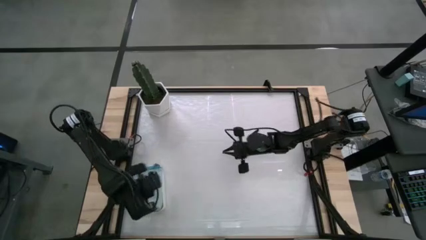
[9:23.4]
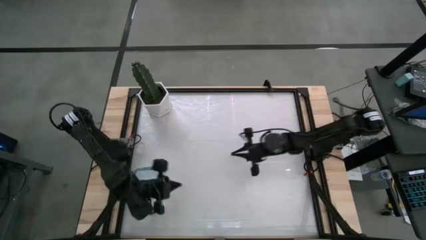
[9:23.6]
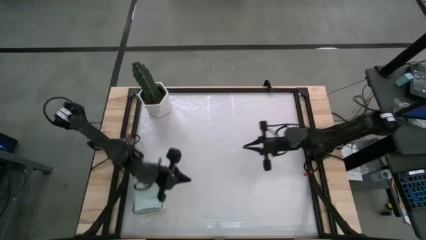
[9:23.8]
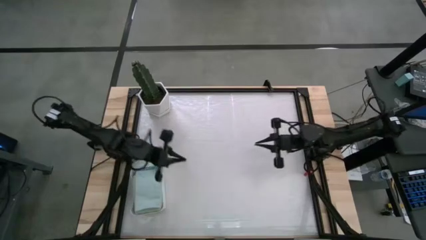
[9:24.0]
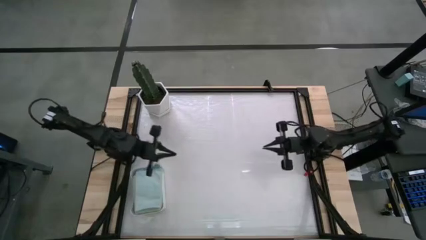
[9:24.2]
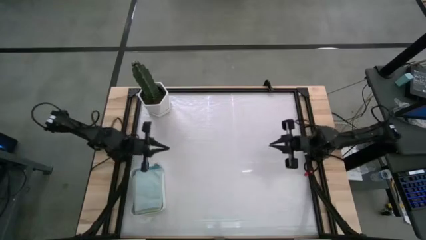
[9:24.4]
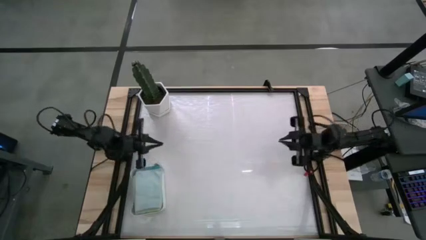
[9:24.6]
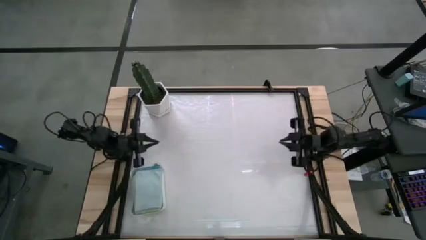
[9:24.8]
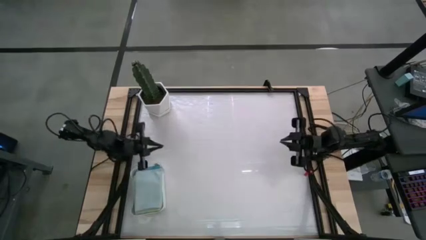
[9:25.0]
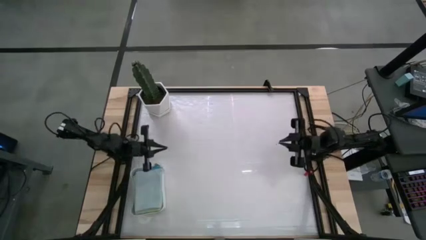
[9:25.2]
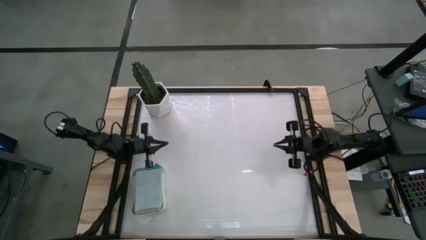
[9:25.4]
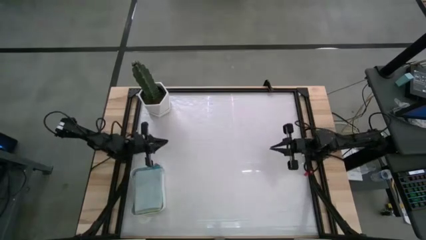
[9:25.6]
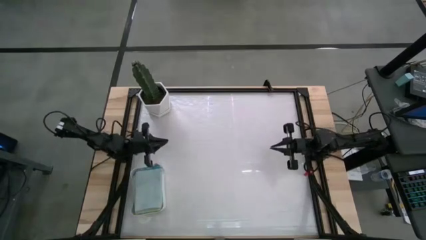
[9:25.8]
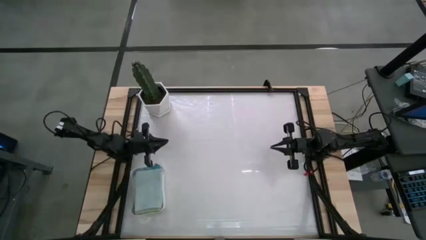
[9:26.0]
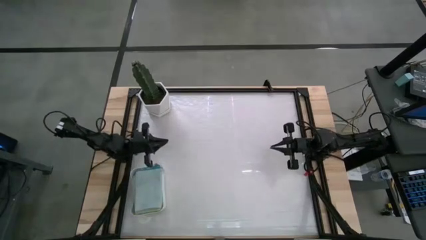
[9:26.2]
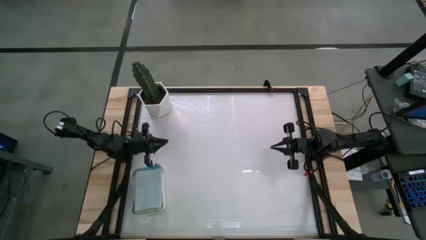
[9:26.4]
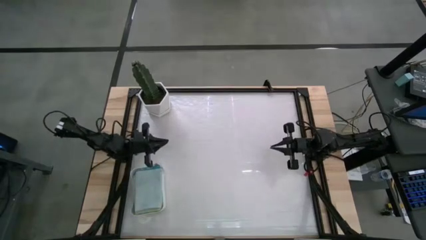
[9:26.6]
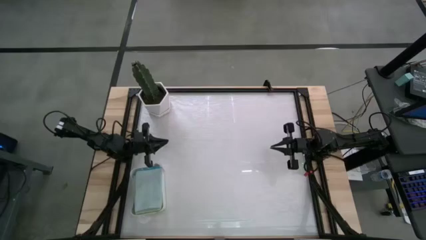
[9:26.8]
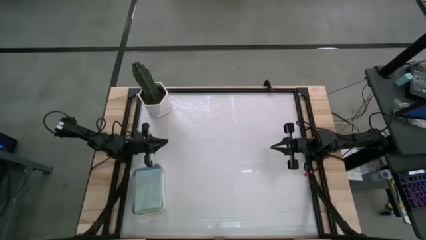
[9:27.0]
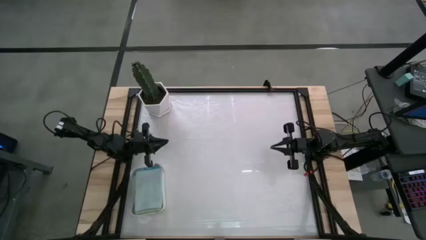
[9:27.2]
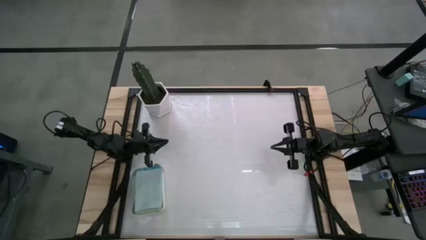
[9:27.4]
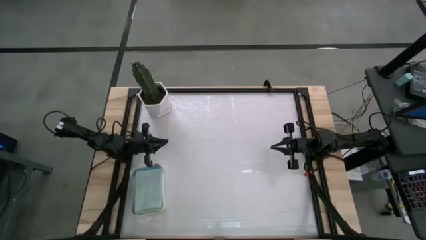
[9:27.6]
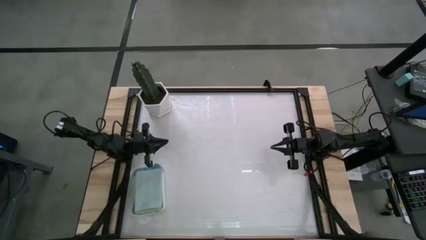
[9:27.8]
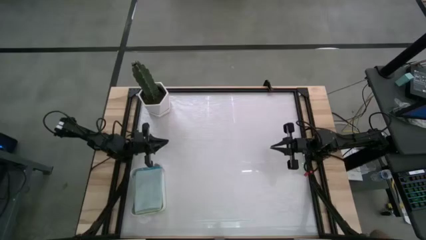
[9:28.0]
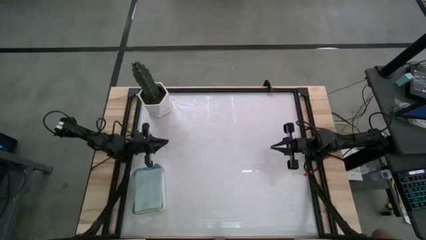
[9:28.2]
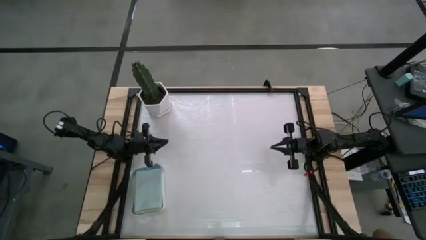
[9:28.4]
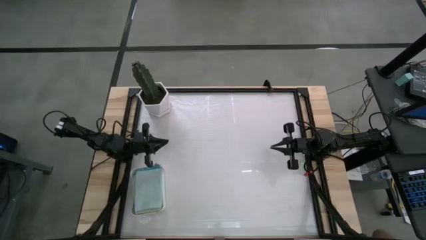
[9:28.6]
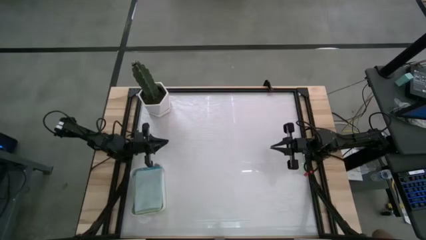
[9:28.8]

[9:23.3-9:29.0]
Task: Fold microfiber towels
Return to Home Position

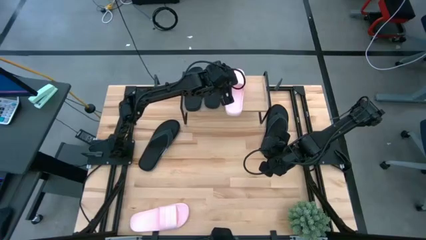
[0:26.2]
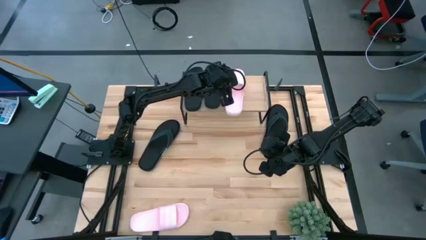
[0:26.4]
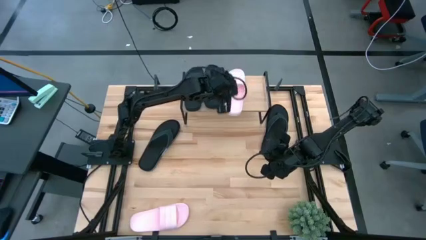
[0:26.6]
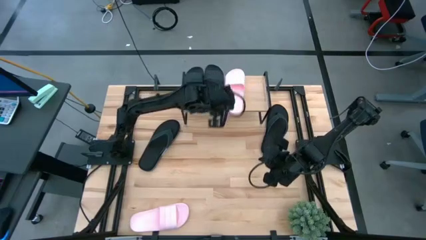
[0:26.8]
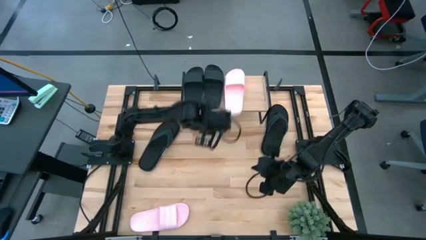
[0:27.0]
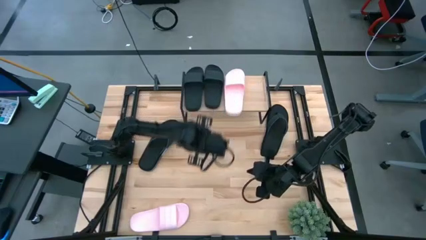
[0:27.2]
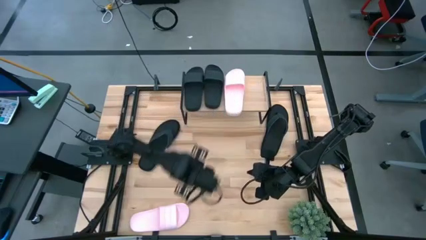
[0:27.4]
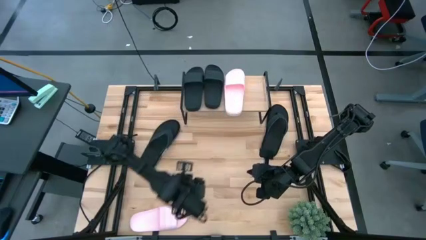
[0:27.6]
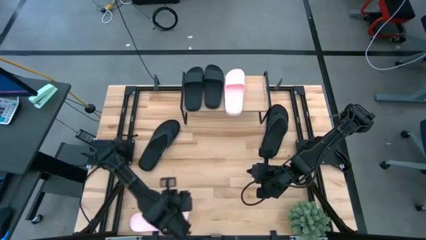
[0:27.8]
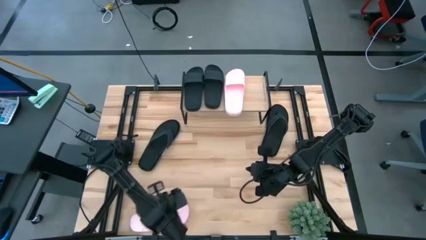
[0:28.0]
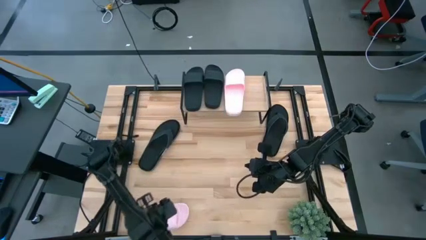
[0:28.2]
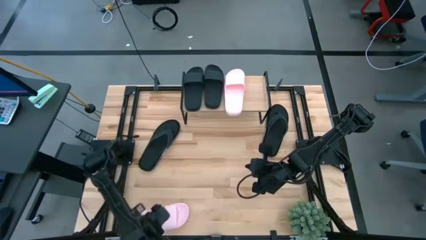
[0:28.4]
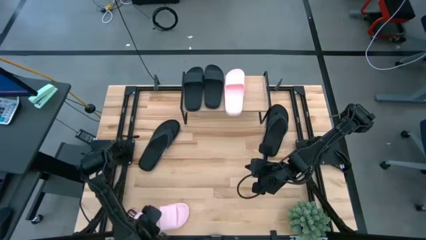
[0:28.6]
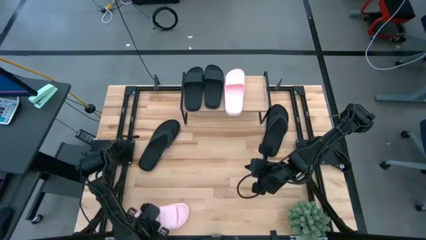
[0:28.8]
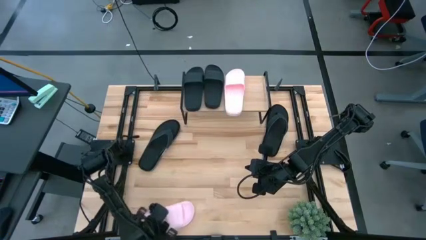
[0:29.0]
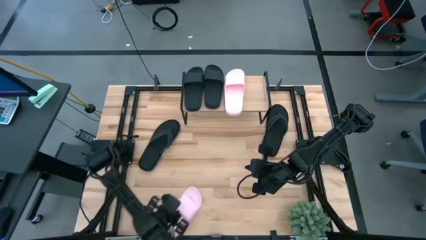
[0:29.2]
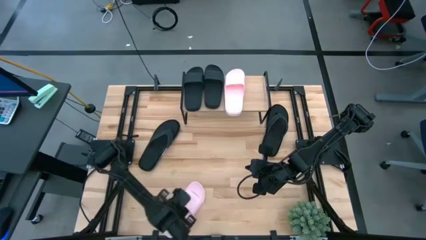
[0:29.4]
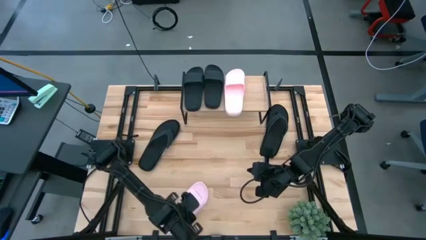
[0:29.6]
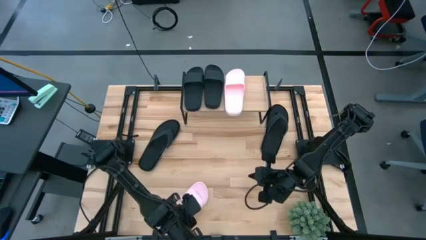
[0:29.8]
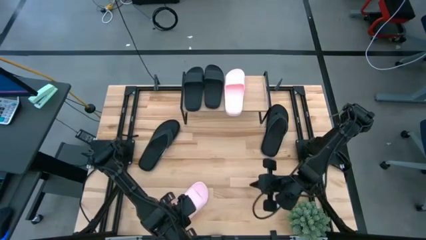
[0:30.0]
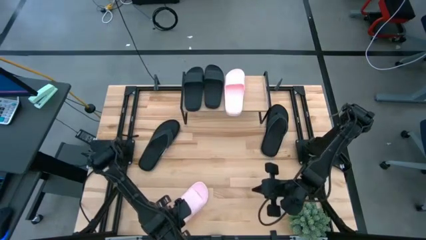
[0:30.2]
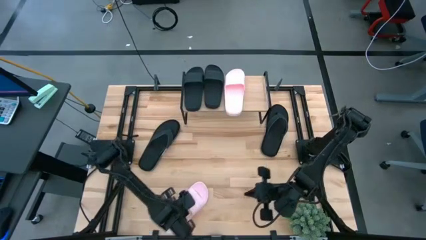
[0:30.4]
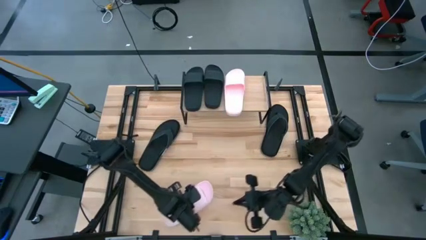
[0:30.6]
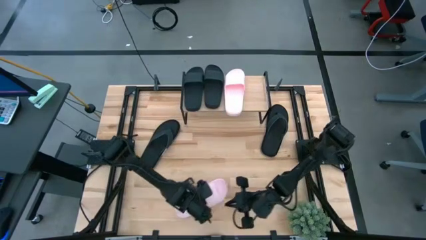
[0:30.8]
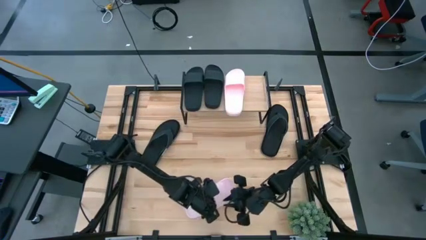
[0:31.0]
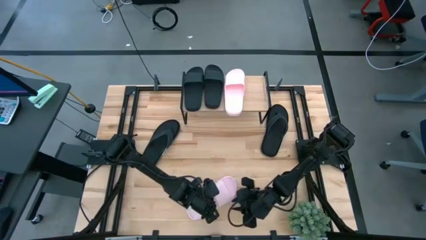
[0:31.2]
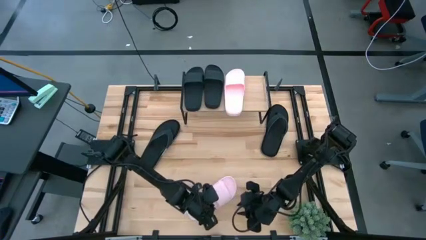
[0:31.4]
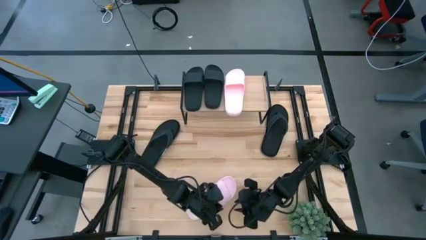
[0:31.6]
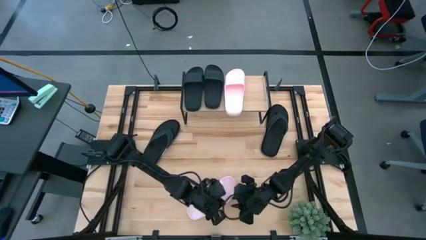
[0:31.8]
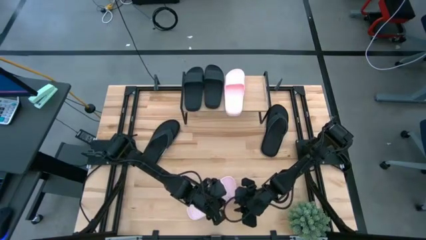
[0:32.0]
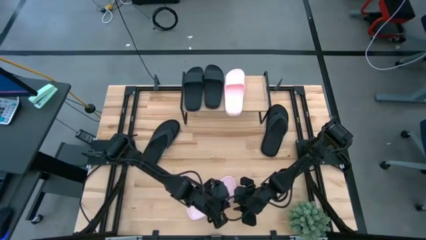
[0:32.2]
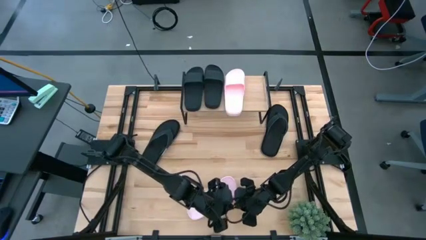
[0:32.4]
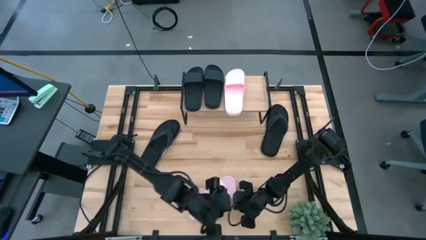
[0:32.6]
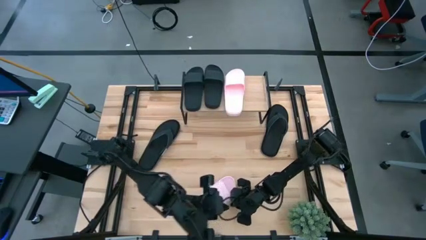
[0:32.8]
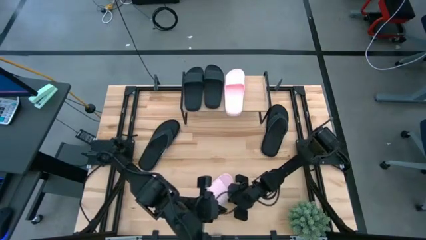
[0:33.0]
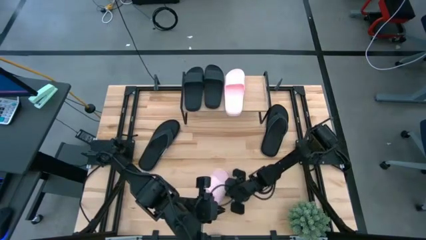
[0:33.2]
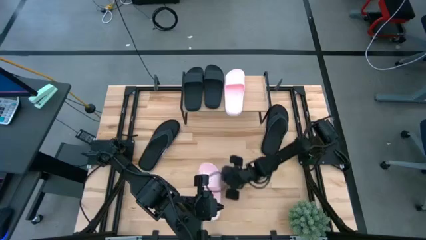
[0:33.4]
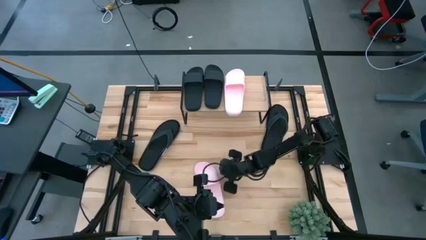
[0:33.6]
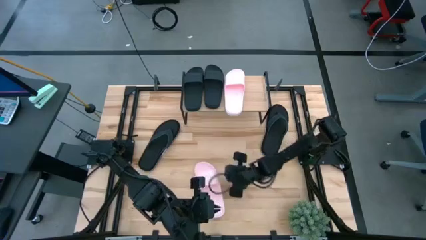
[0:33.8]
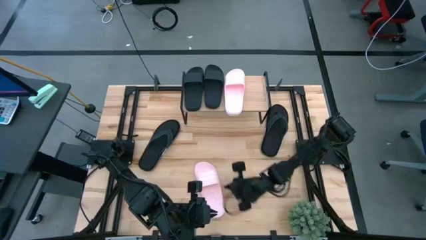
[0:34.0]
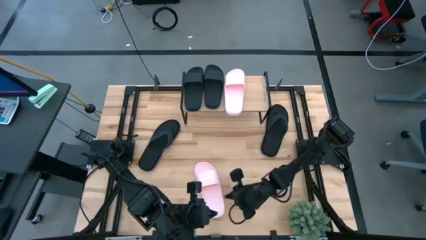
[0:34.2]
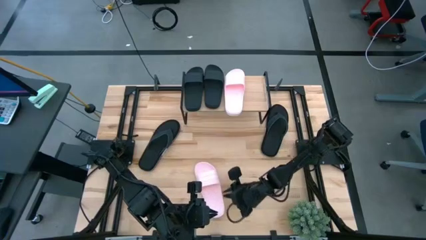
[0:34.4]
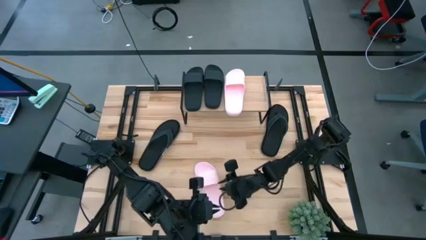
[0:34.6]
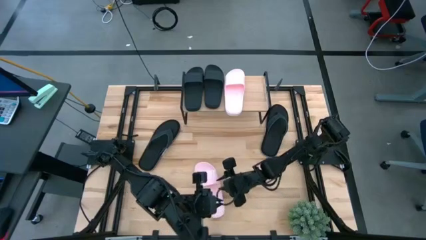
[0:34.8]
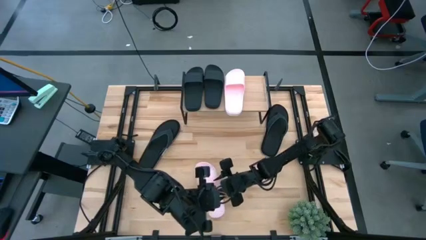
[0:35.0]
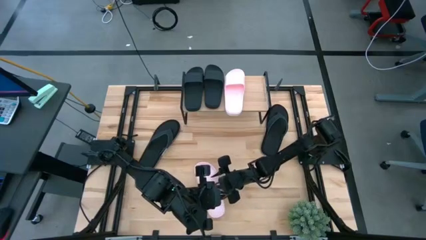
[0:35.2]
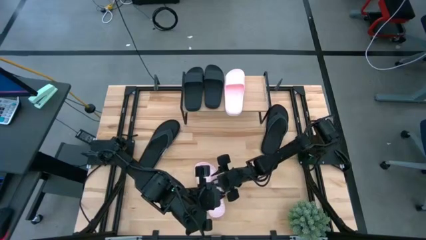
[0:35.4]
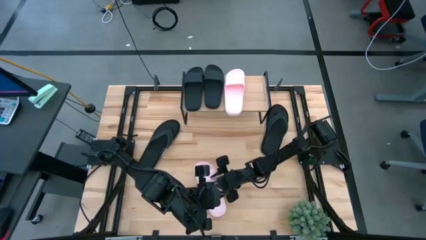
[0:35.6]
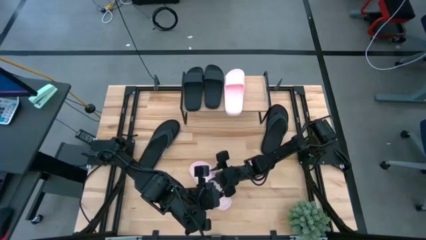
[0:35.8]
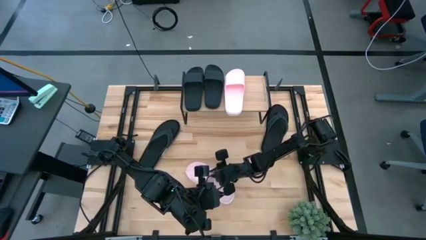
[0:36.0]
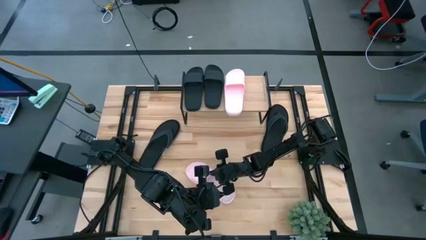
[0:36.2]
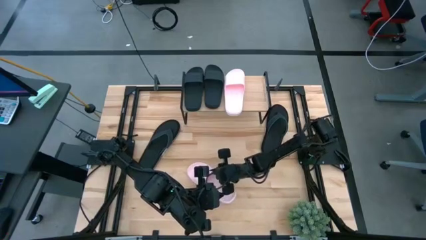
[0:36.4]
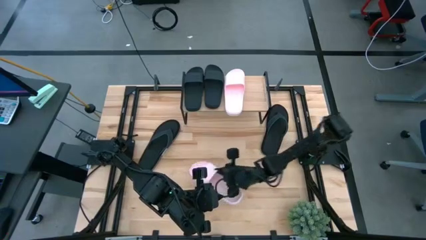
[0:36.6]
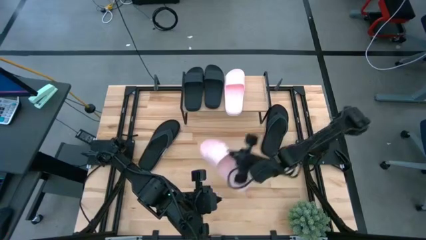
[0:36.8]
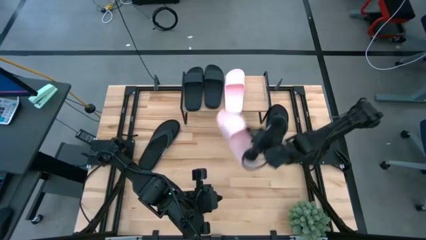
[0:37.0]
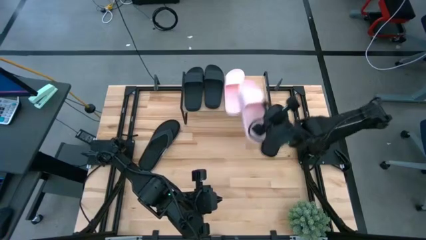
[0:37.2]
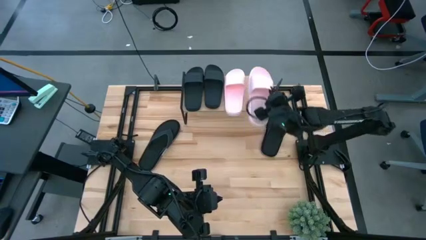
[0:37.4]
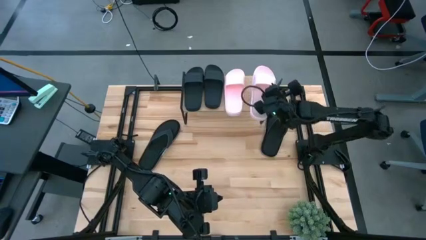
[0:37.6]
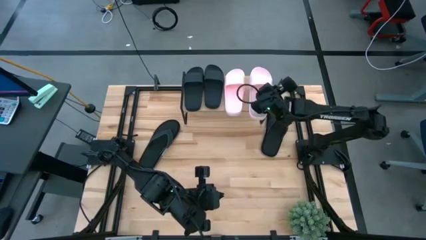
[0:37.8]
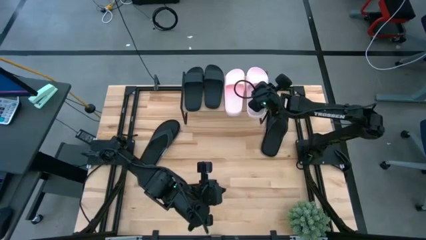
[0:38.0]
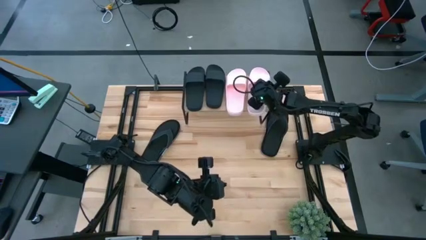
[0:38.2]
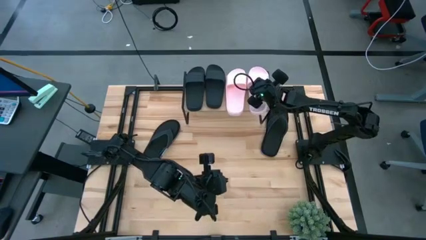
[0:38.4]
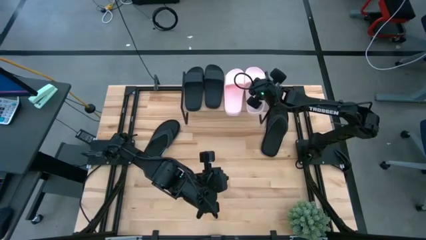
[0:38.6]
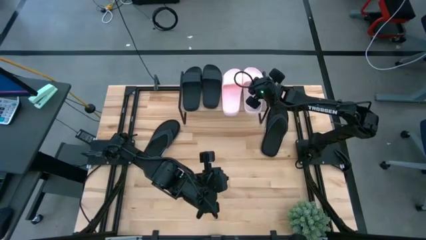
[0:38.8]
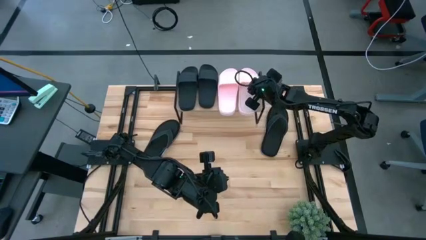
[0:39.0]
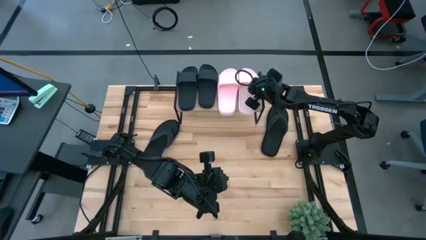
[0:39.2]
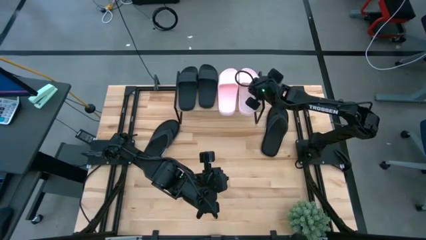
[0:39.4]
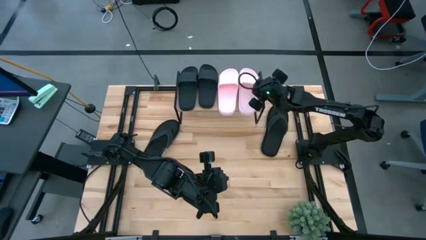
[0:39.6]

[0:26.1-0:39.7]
Task: Pick and place slides into the shelf
Put the pink slide on the shelf
